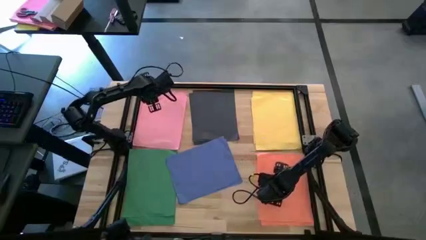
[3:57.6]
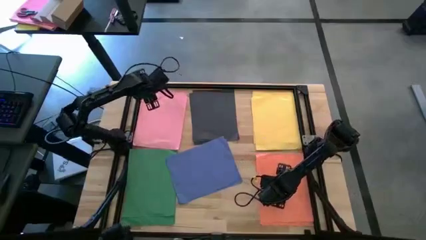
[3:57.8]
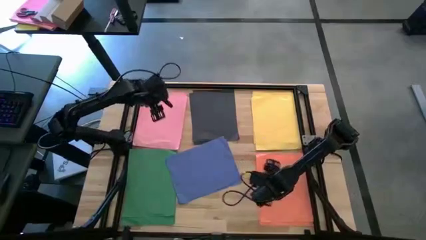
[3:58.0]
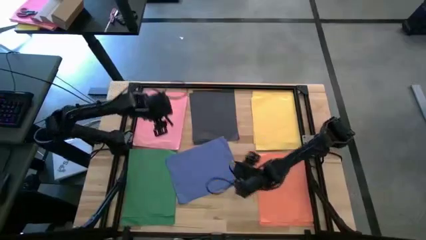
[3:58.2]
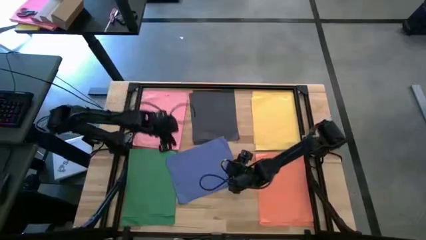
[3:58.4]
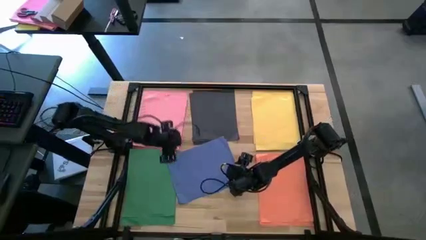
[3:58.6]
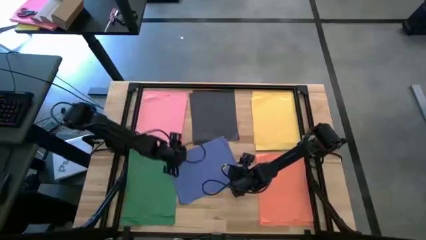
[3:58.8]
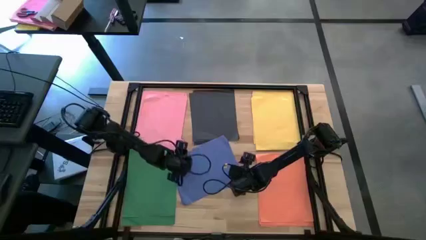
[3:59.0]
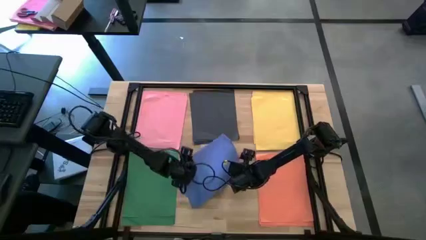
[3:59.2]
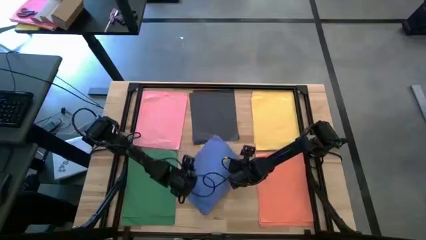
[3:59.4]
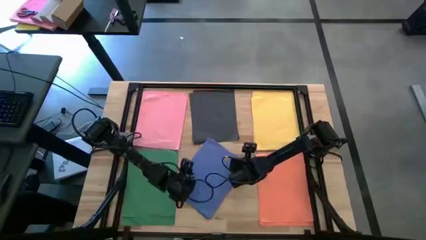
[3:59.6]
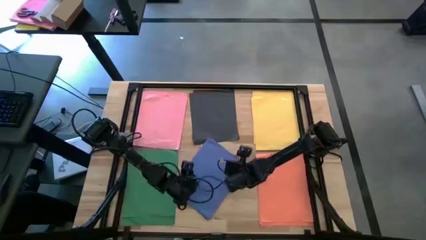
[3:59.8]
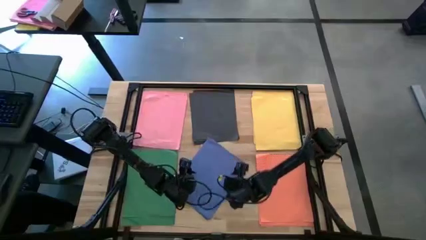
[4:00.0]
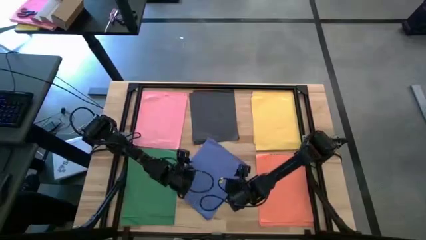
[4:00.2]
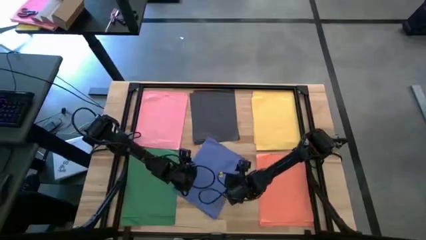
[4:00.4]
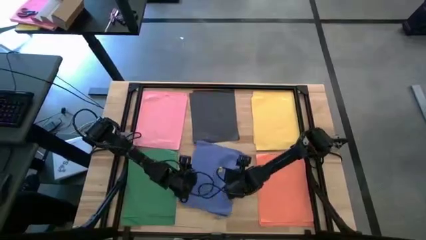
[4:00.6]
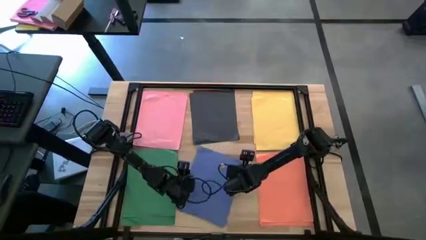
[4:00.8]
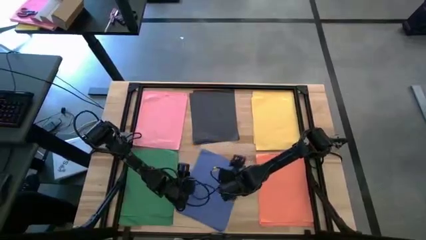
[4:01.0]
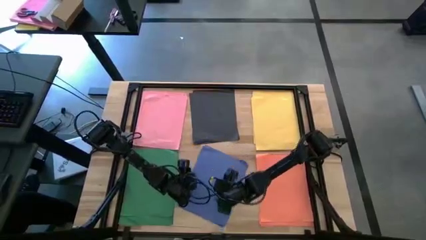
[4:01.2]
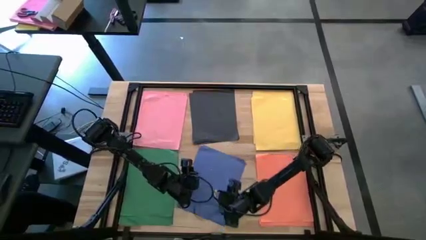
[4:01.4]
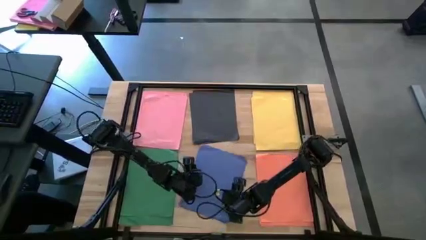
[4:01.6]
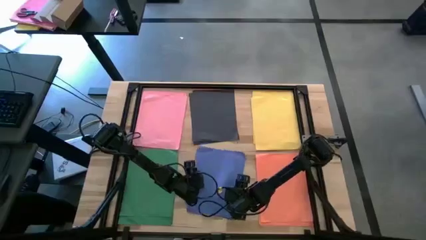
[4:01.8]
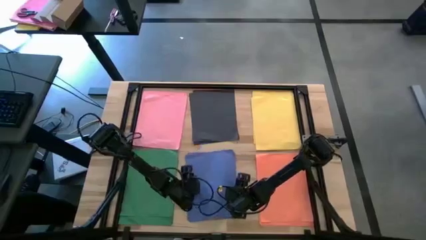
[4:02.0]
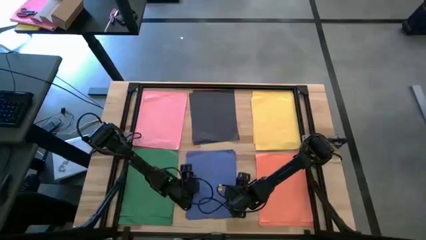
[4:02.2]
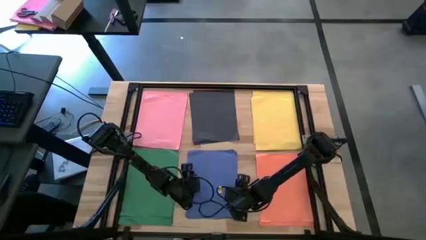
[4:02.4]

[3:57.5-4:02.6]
Task: Organize paper
Adjust the stacked purple color papers

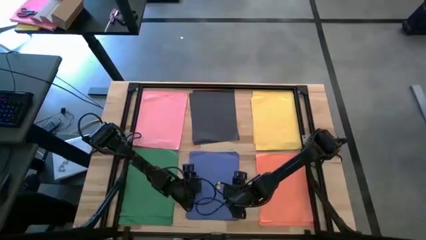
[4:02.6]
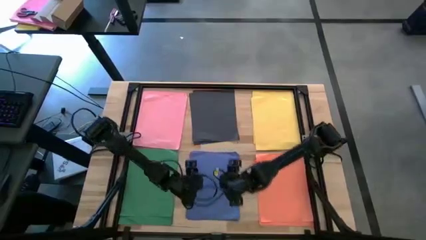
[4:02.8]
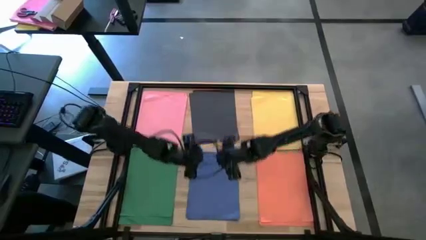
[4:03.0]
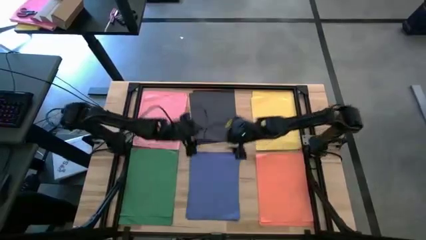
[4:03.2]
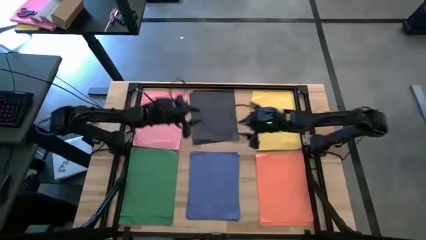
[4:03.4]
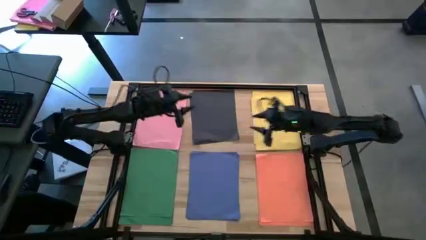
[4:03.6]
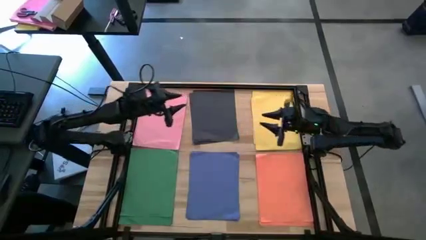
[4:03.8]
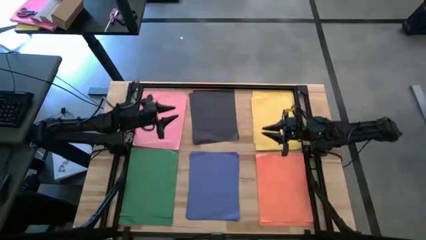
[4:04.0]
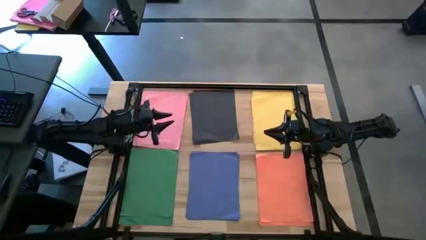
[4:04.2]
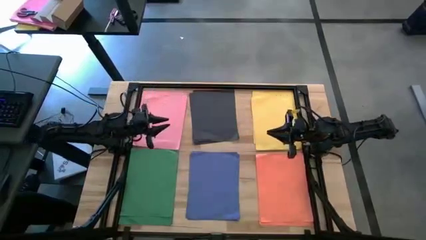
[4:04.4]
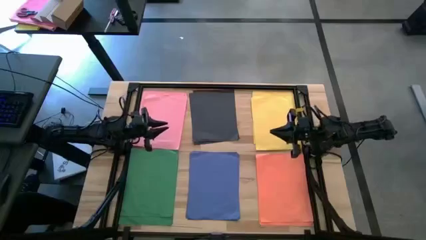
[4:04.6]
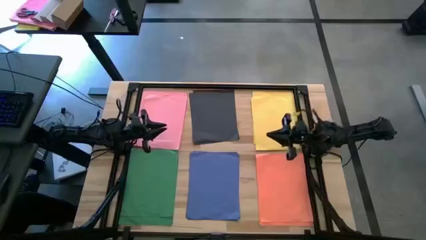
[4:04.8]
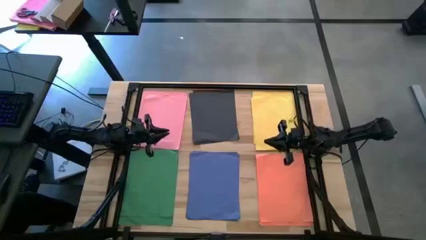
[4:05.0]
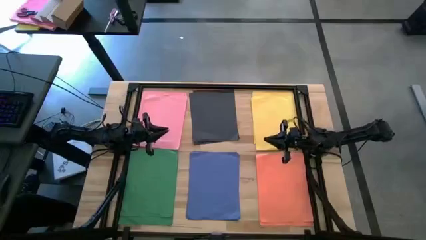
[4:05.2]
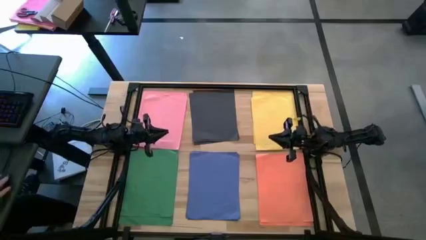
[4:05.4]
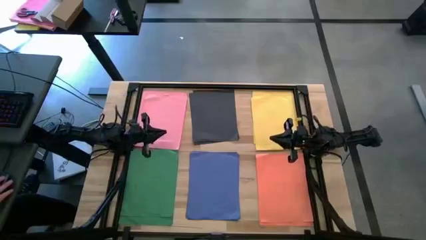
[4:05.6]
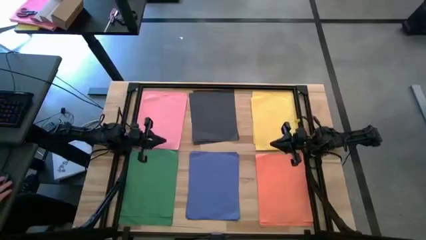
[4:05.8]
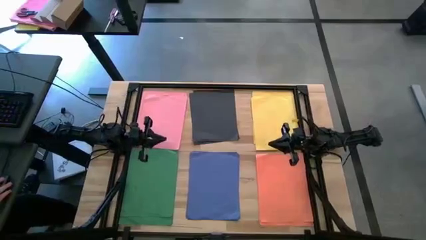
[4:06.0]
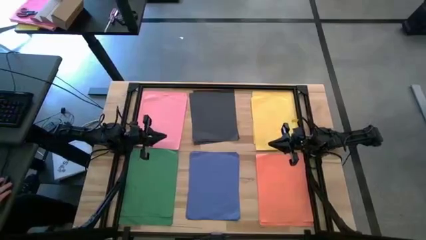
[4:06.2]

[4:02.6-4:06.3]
Return to Home Position

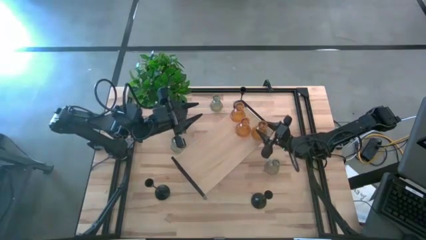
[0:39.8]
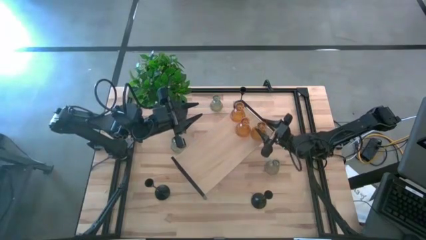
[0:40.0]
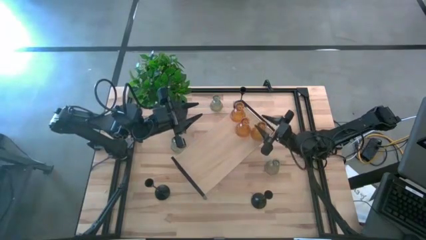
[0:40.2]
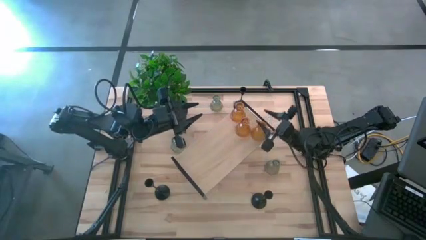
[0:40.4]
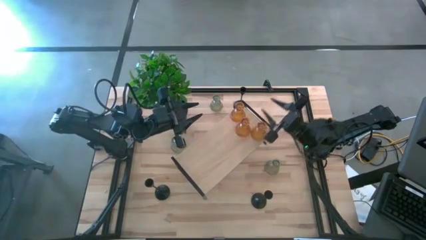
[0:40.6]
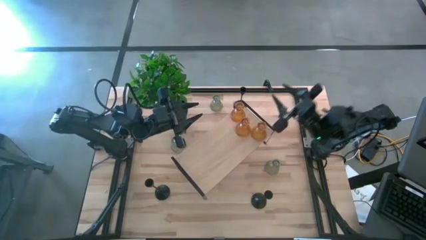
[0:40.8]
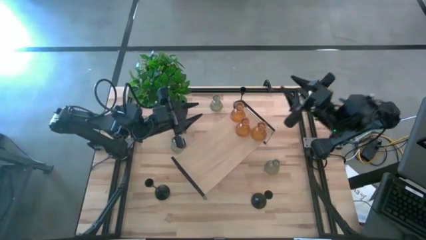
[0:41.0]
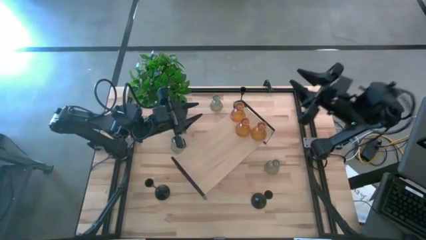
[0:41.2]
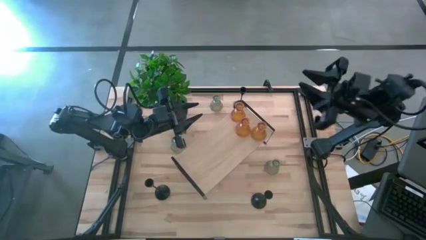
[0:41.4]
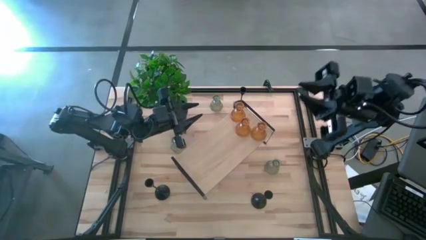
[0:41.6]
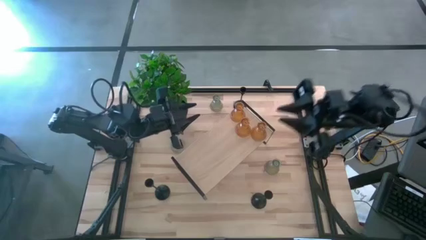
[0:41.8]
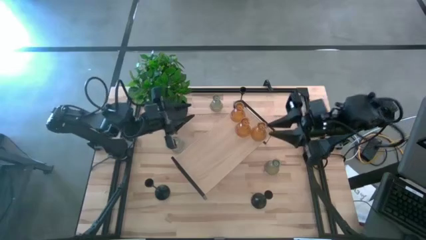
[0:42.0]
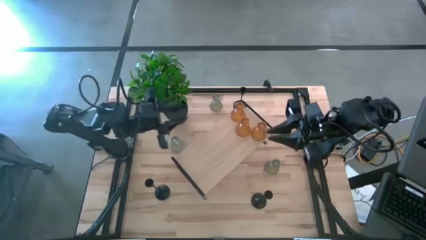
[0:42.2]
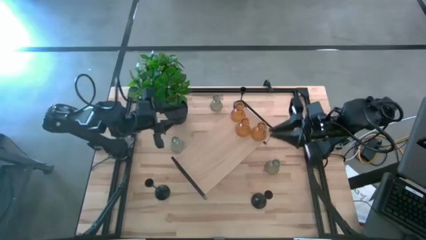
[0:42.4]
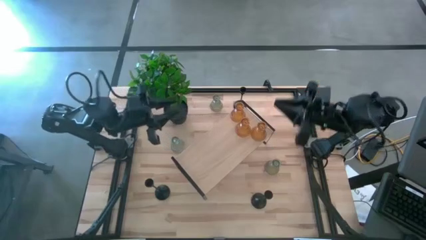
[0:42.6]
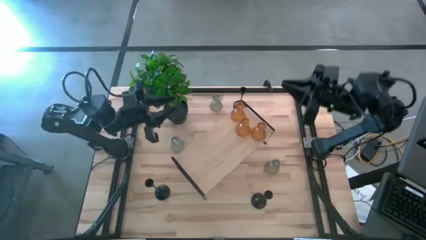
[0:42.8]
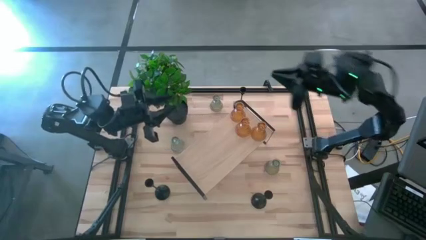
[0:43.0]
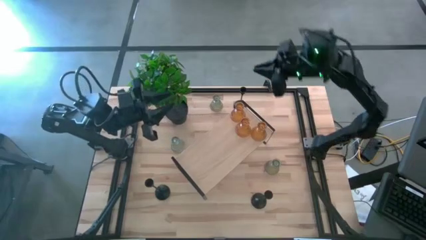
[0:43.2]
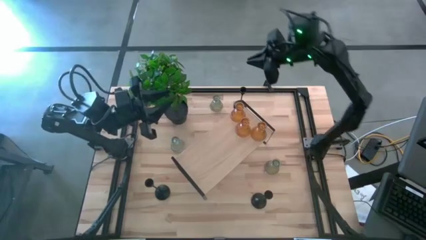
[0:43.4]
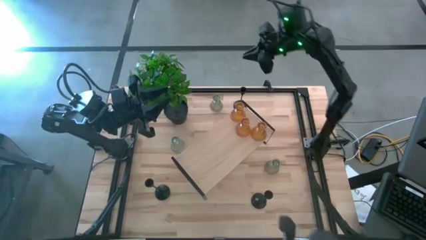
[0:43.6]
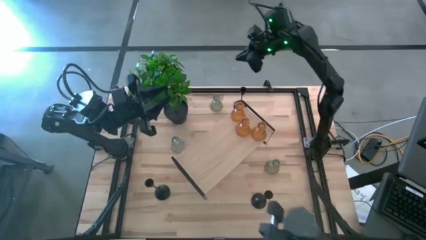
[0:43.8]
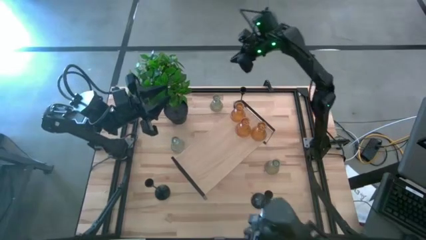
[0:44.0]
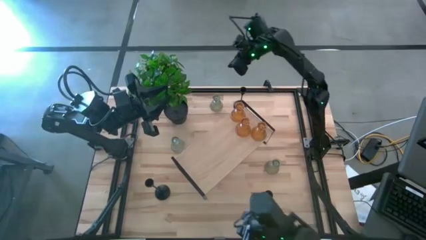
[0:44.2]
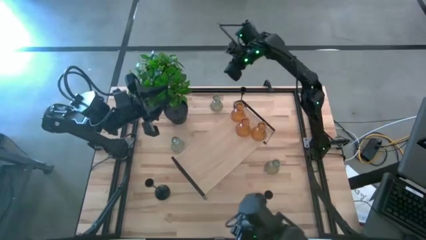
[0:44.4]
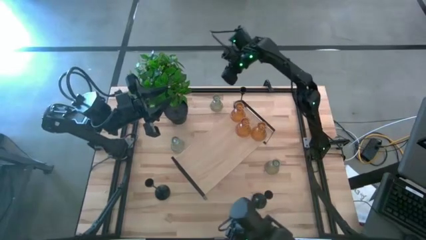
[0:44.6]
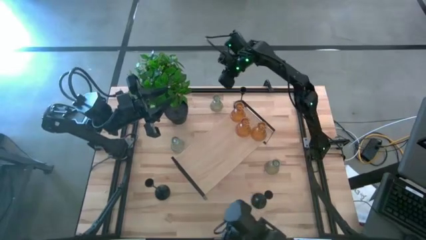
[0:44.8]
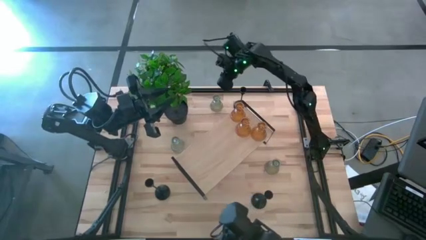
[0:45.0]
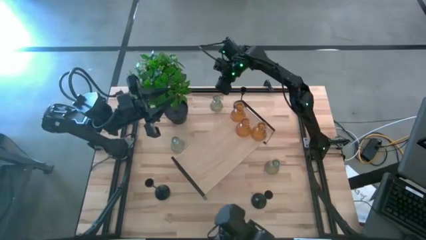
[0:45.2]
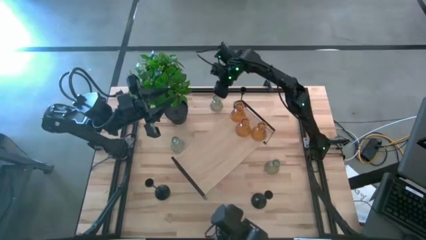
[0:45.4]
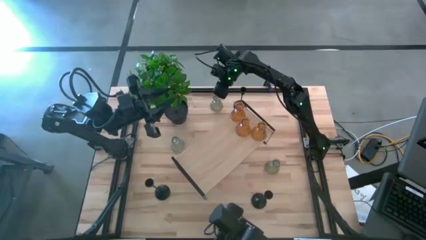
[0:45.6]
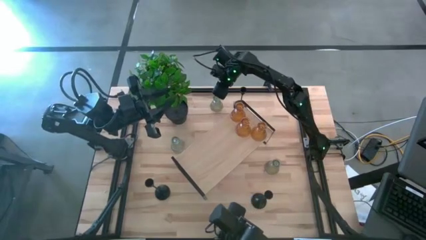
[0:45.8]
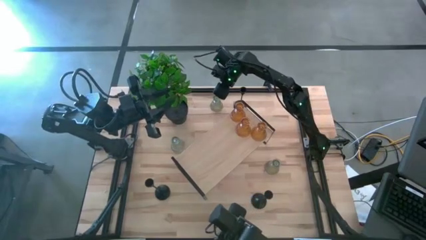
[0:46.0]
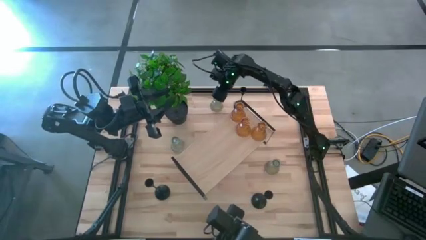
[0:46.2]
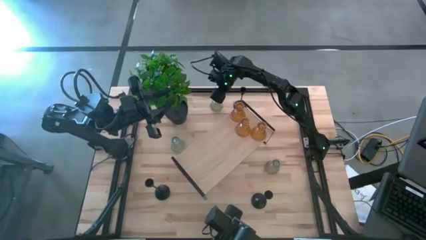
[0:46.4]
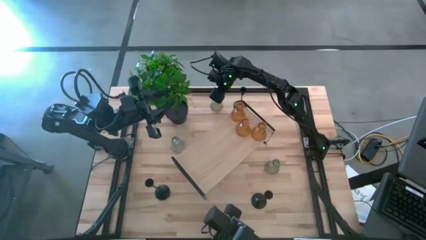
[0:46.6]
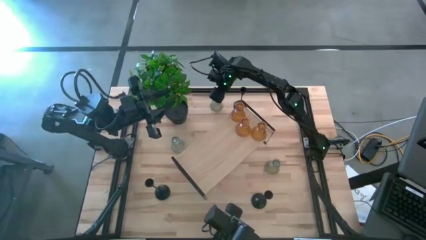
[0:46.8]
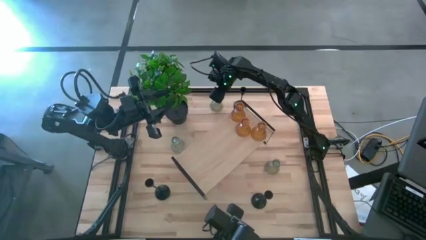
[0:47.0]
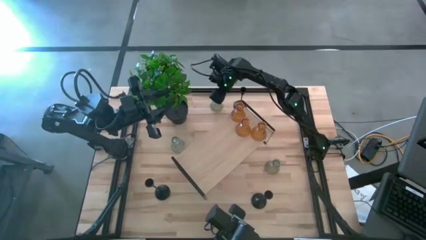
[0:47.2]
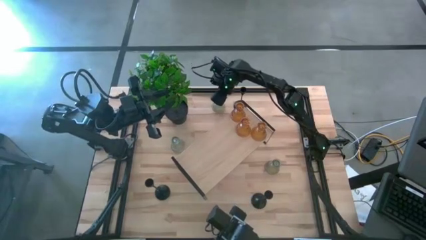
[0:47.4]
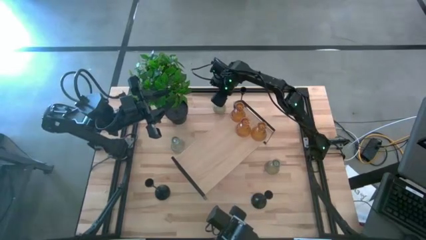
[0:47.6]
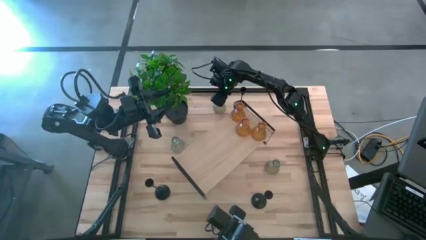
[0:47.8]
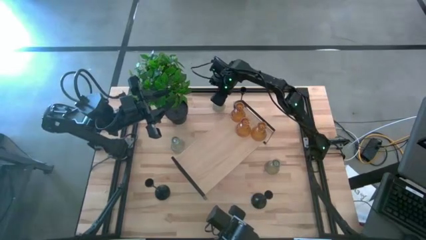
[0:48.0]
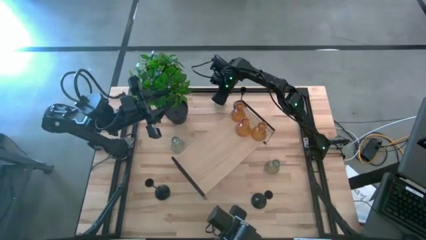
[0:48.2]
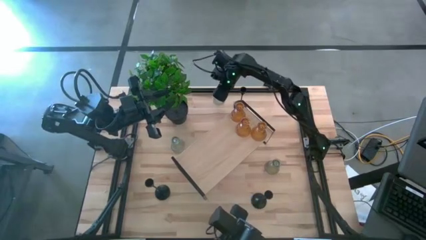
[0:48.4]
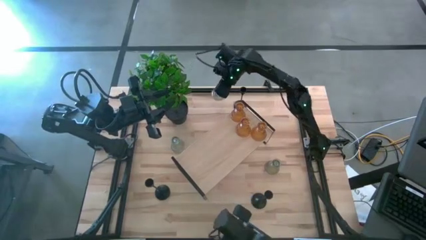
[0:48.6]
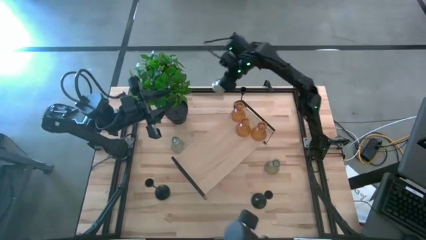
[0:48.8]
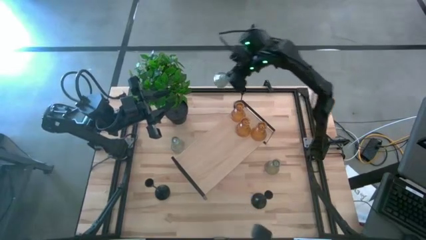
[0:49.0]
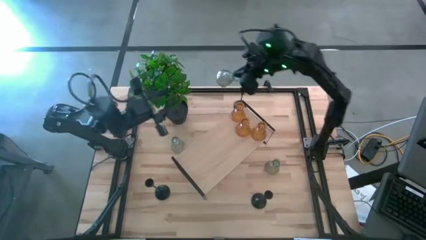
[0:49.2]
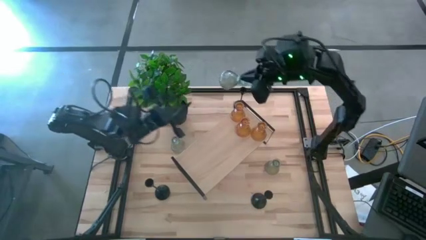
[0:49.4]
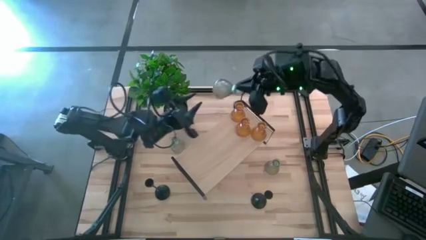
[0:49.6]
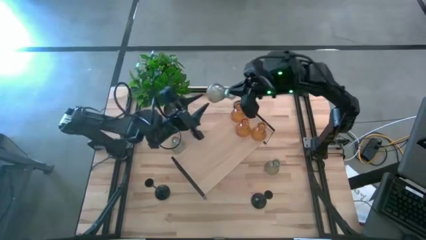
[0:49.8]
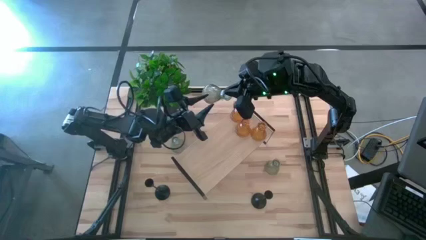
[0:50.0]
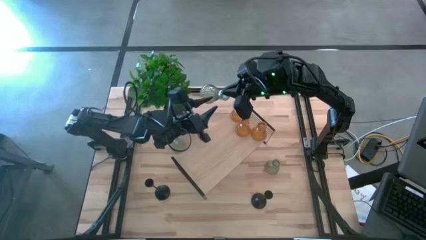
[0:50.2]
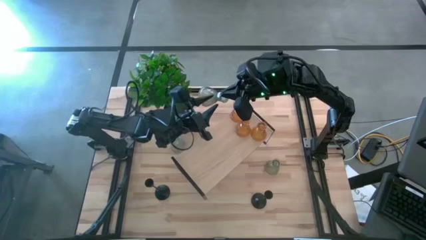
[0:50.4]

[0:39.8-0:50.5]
Task: Pick & Place candle stick holders
Put the top transparent glass candle holder on the shelf
